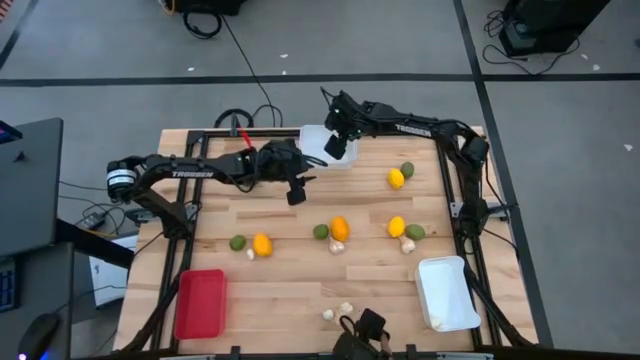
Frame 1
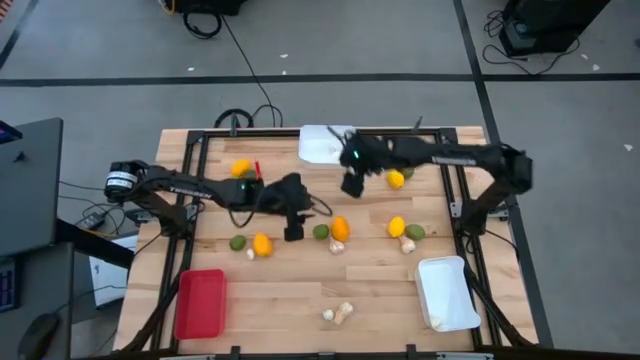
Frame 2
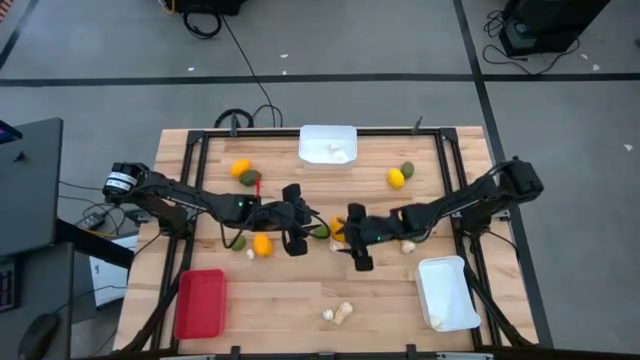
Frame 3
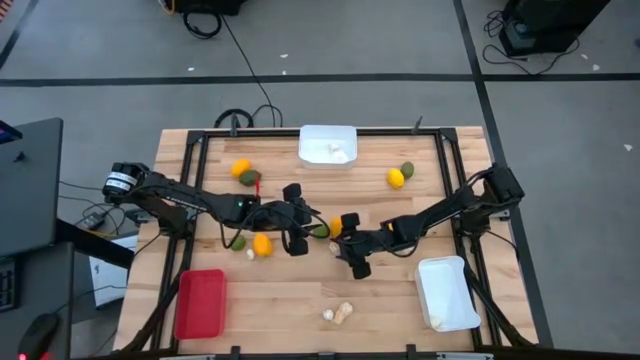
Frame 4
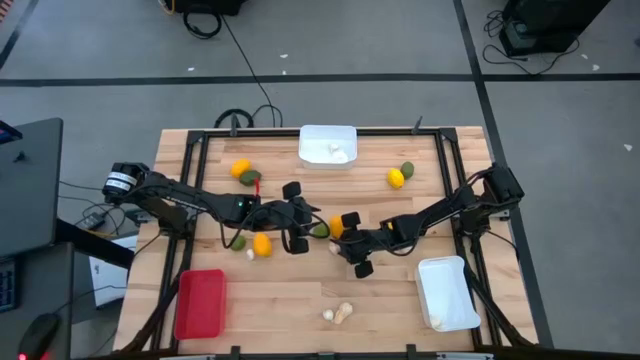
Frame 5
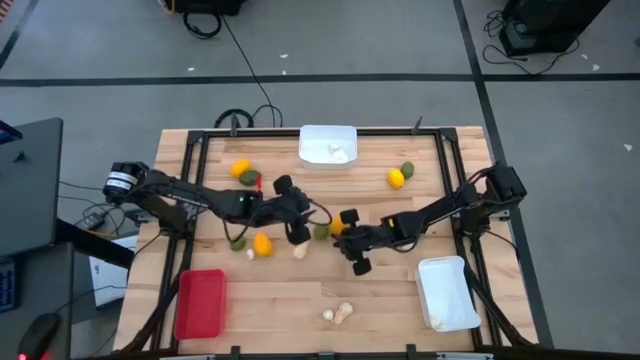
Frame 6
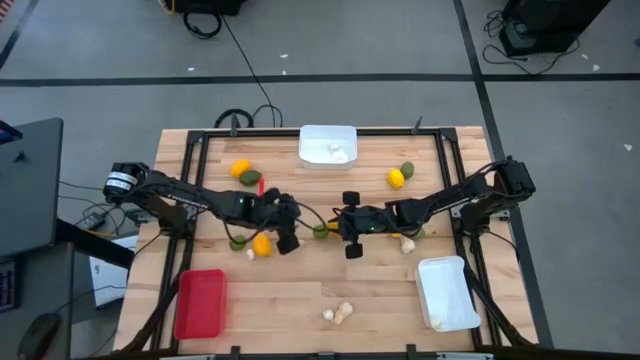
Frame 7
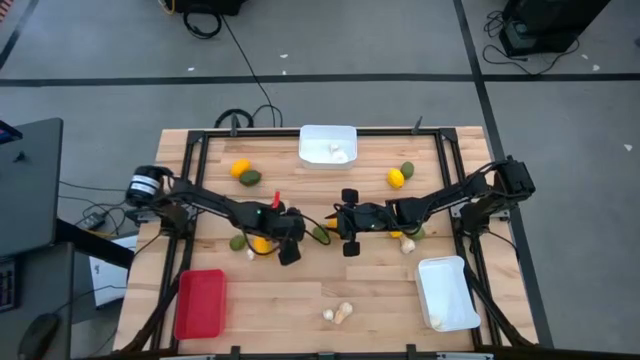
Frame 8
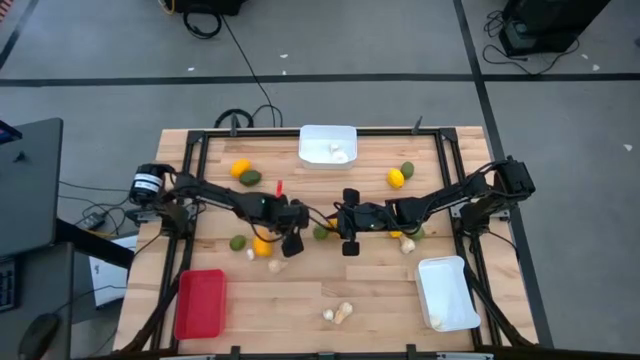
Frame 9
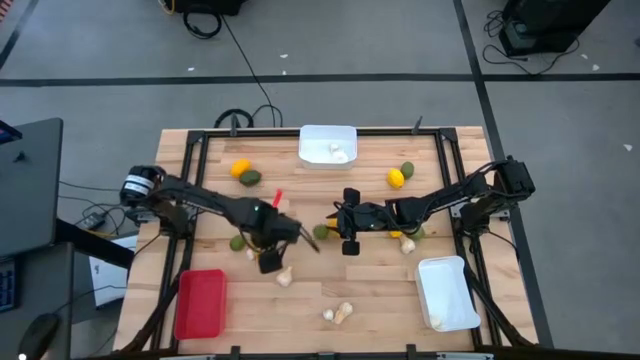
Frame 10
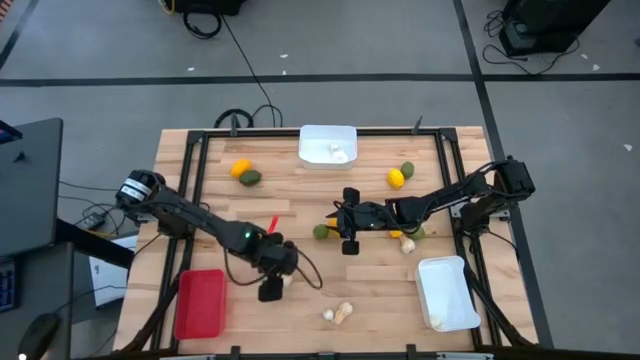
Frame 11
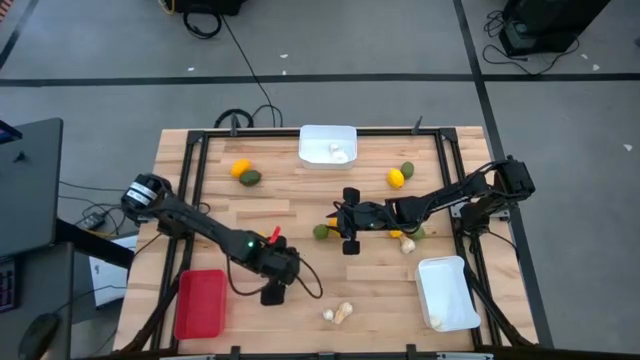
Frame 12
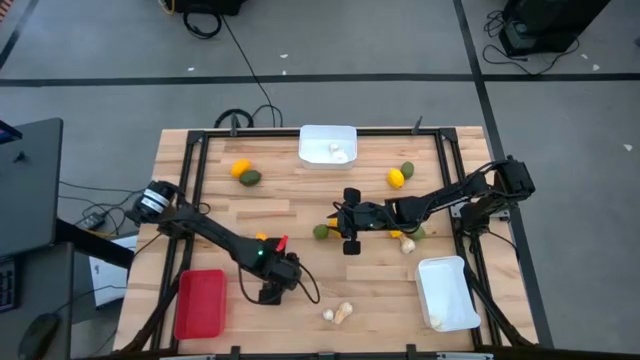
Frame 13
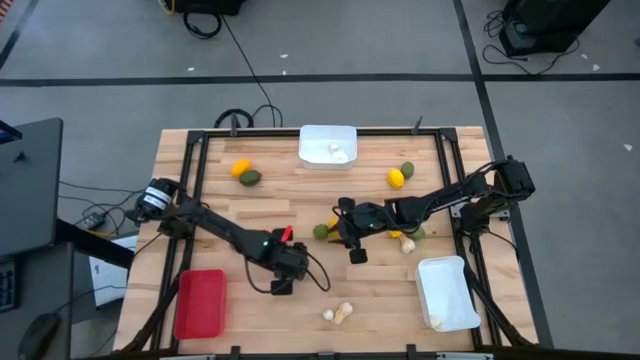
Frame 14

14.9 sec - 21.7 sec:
Task: Sort produce into baskets
Put the garlic into the top white bin

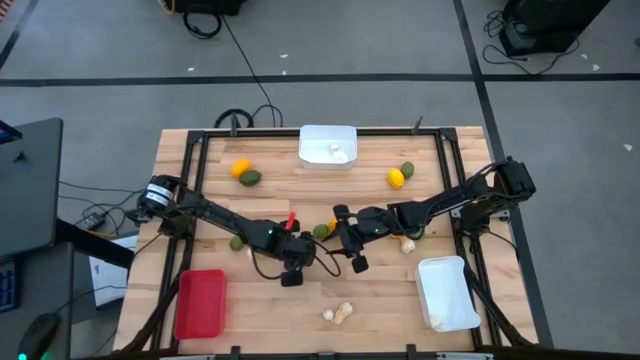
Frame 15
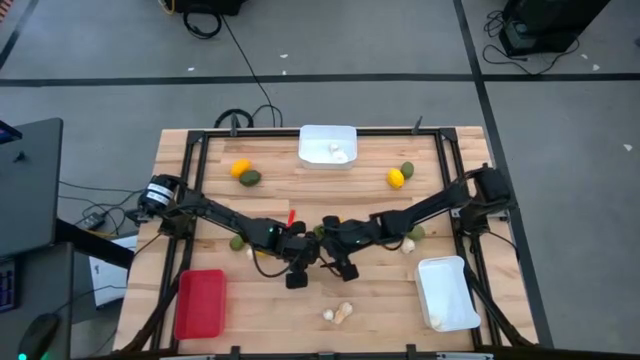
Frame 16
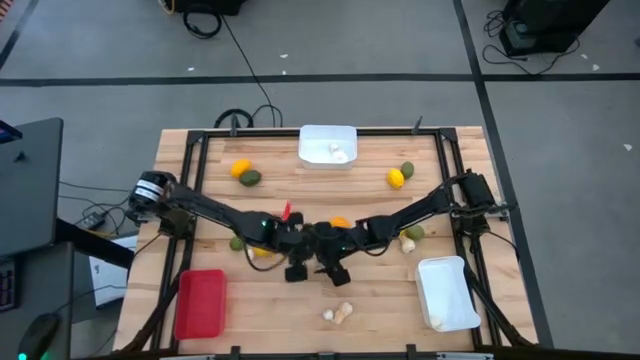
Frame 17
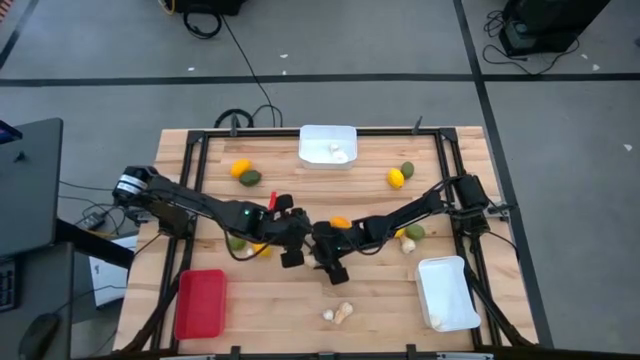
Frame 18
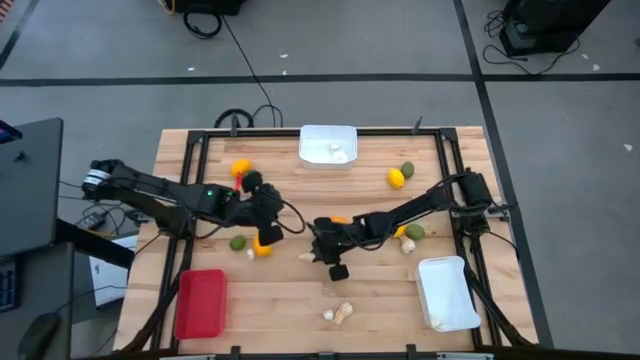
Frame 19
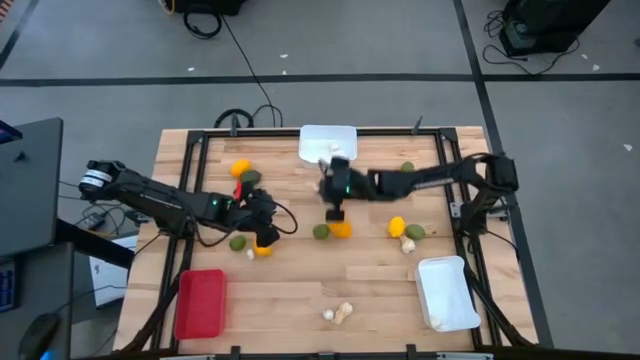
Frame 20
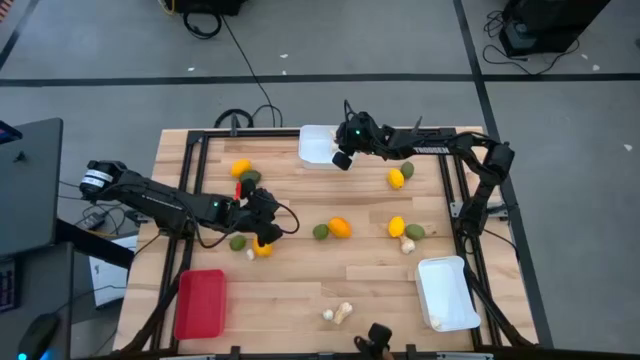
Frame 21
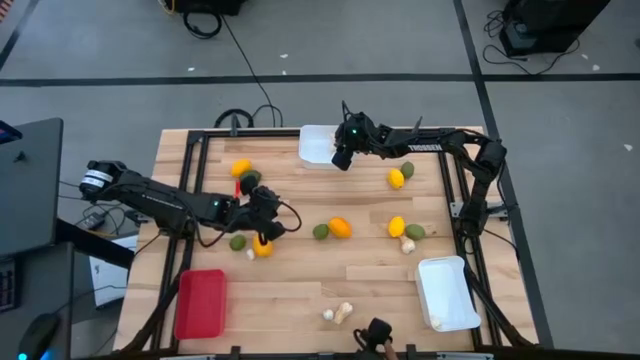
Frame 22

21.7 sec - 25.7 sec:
Put the garlic into the top white bin

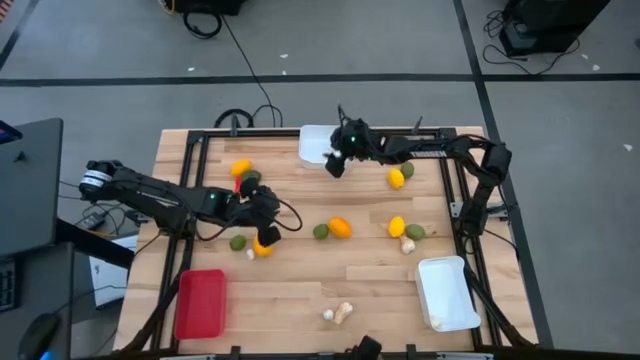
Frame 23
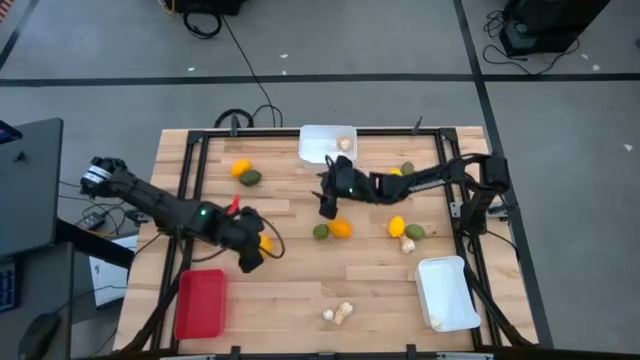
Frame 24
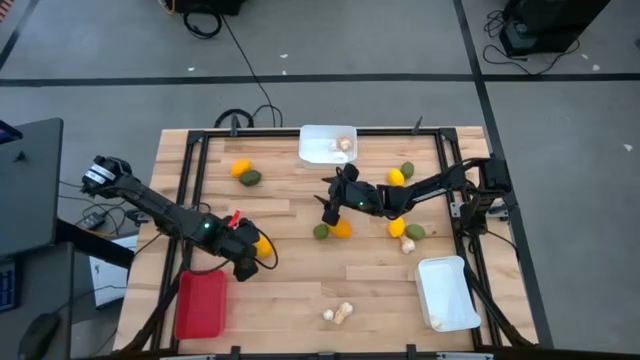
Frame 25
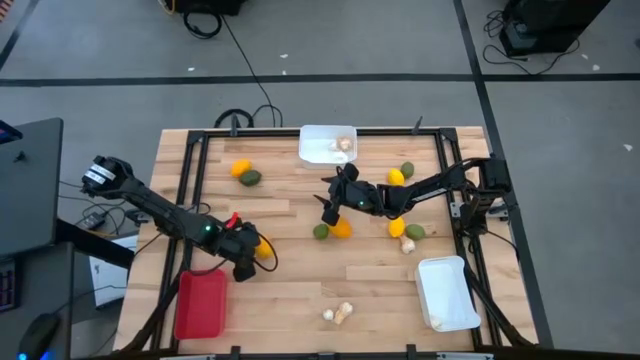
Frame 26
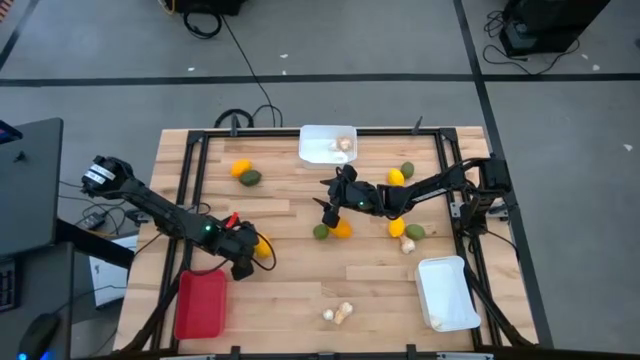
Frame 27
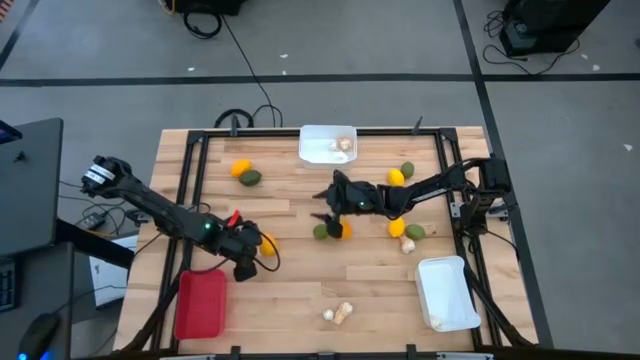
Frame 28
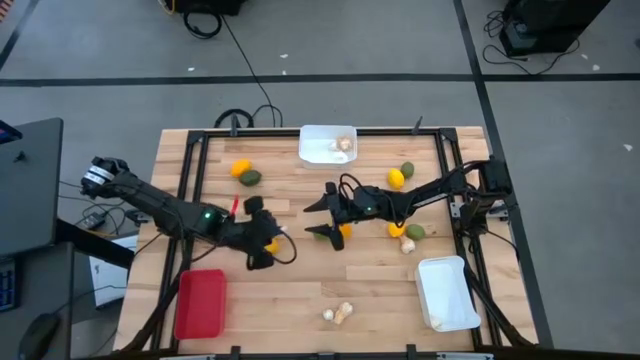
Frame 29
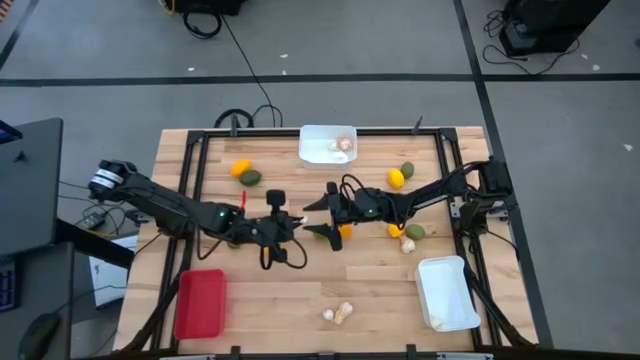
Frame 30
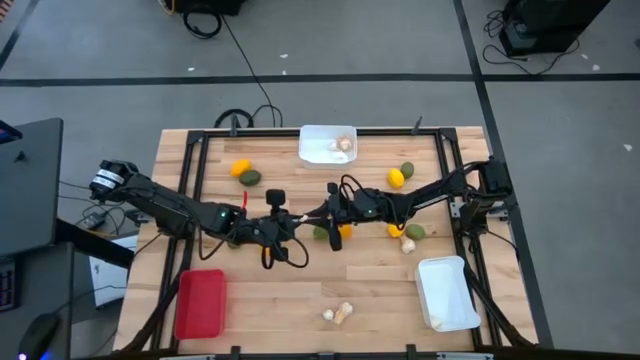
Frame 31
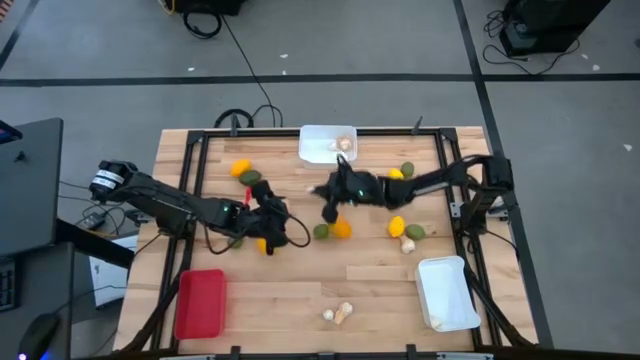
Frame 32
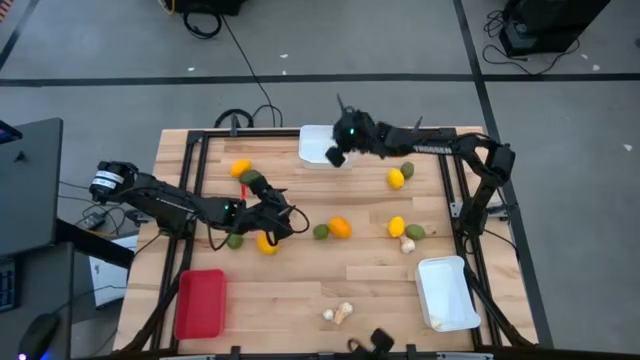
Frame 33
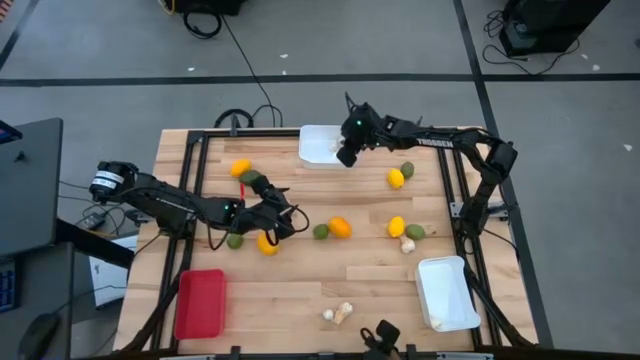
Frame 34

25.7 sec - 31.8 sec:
Put the garlic into the top white bin

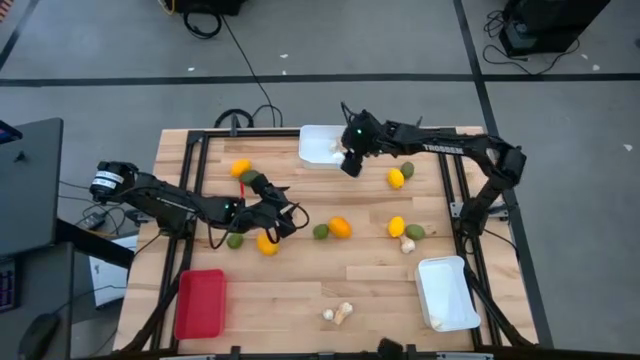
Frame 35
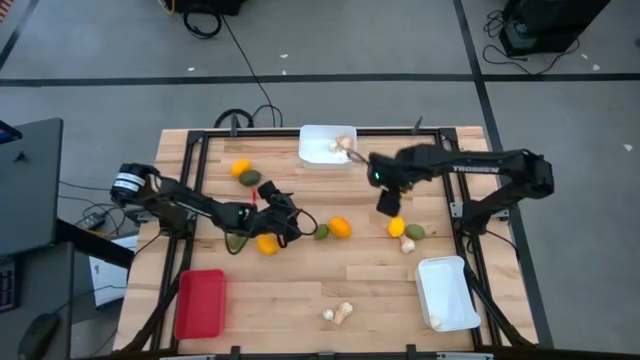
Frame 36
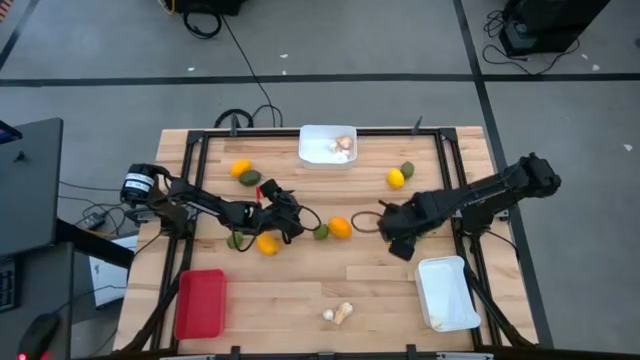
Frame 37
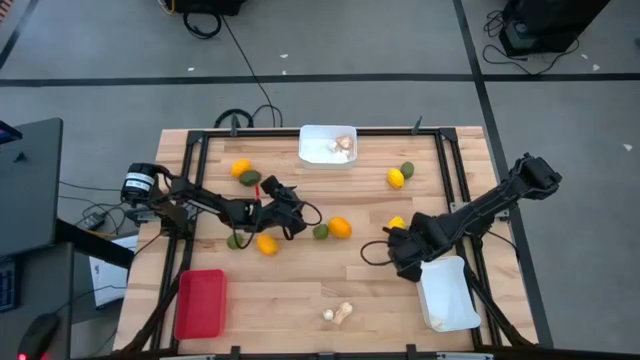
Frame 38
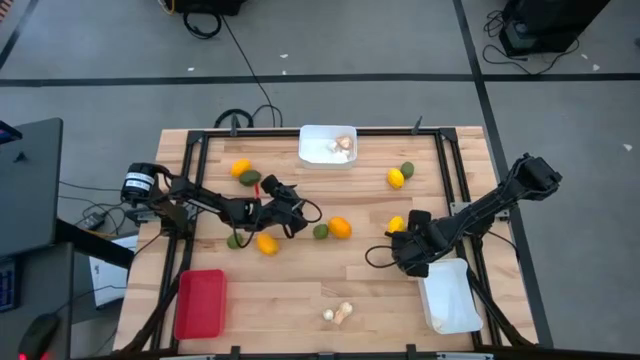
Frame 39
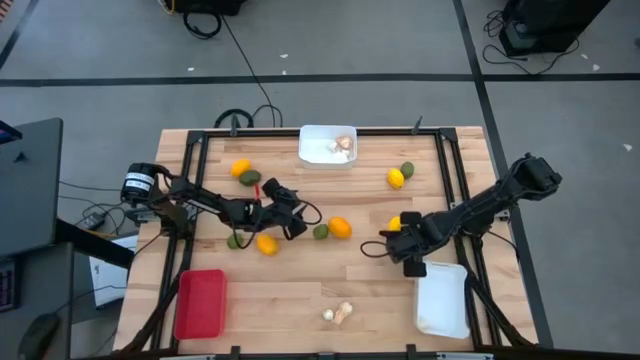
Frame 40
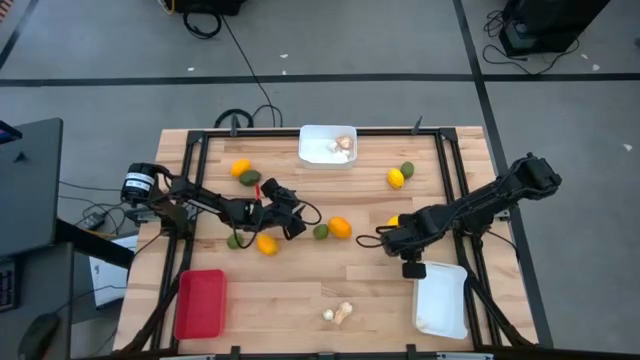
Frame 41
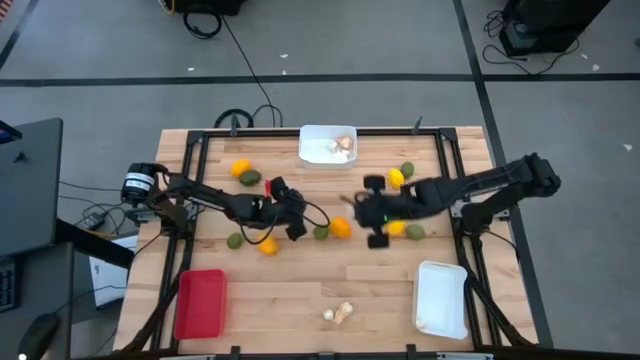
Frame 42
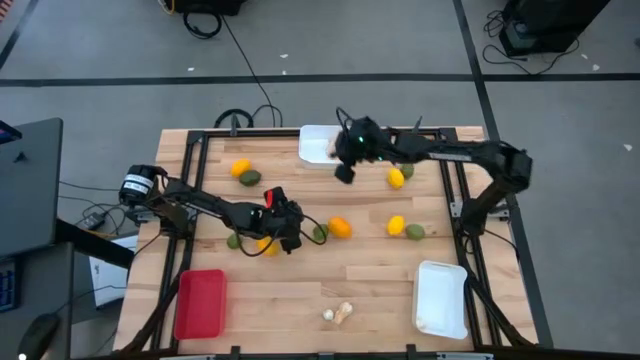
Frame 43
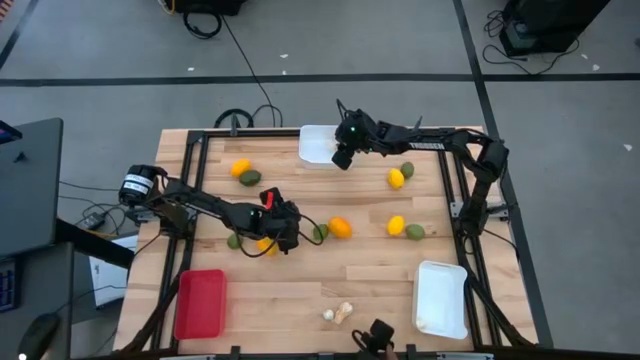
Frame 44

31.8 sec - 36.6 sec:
Put the garlic into the top white bin

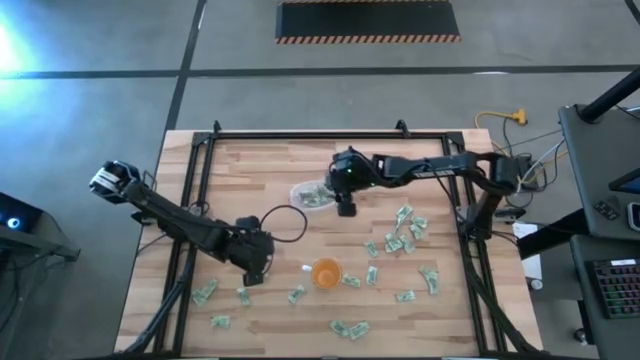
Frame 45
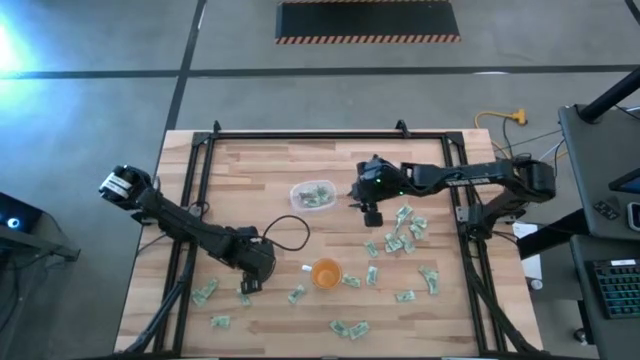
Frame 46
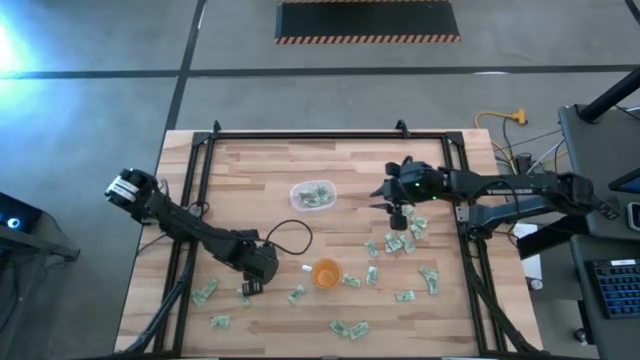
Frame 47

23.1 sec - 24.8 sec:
Task: Pick and place Stevia / Truvia into bins
Put the stevia packet into the transparent bin
